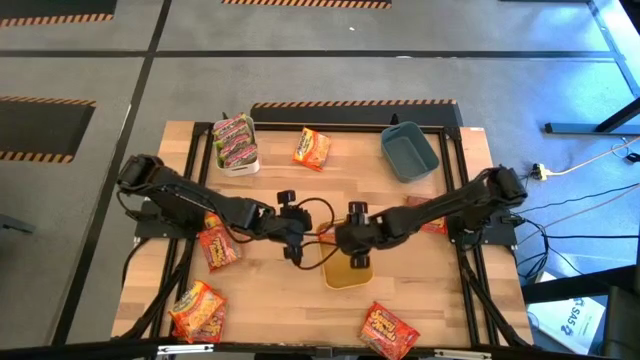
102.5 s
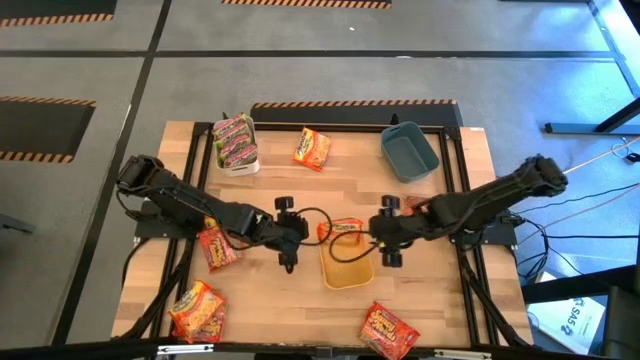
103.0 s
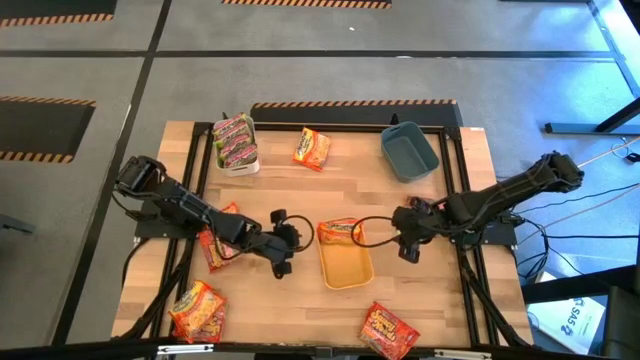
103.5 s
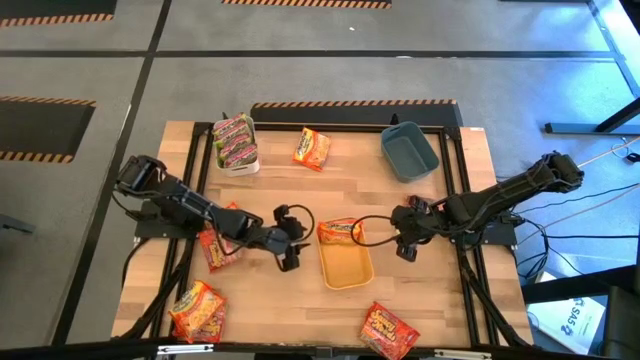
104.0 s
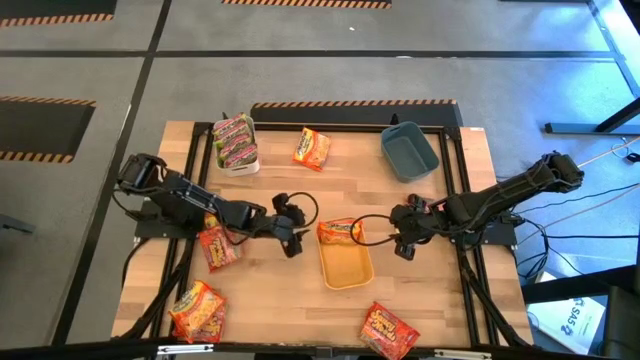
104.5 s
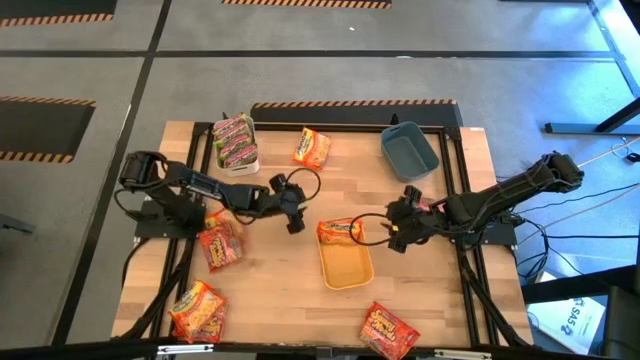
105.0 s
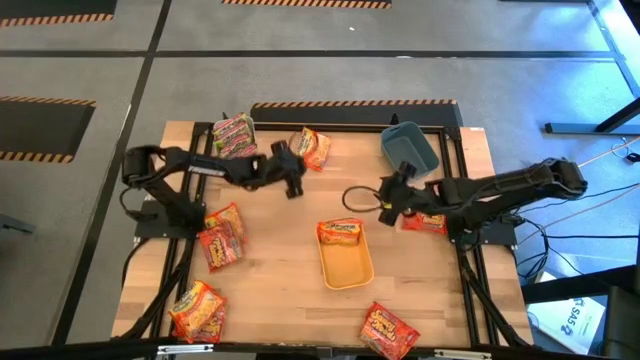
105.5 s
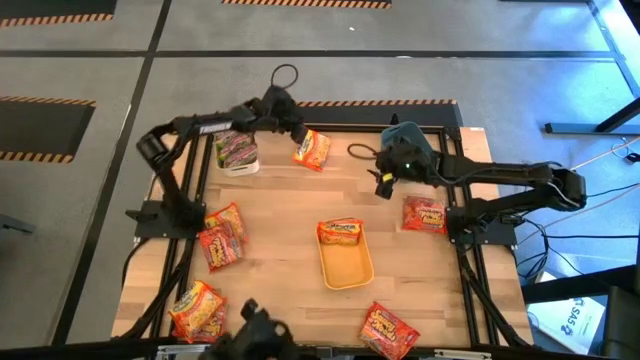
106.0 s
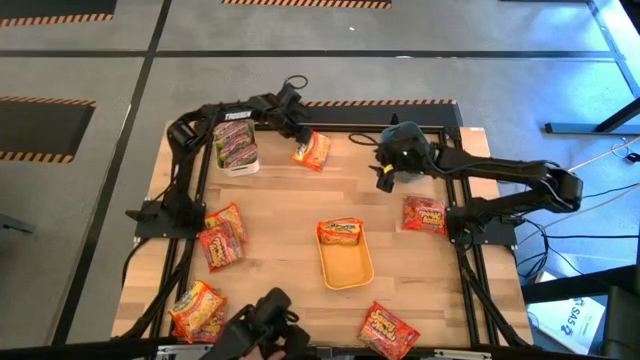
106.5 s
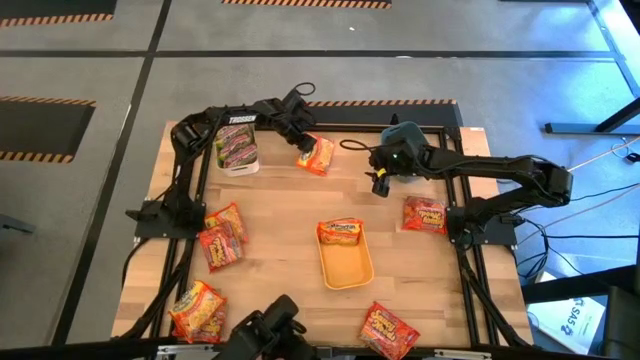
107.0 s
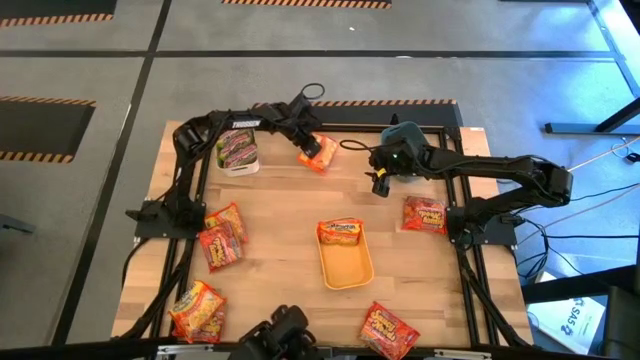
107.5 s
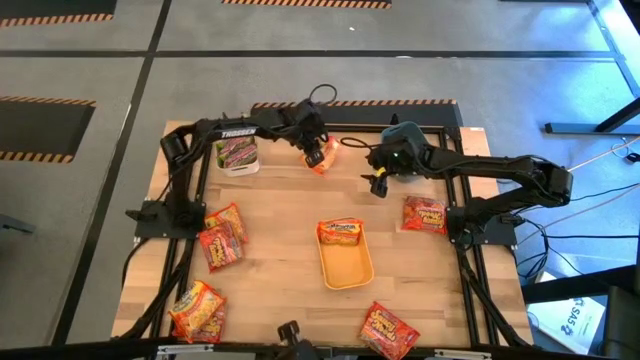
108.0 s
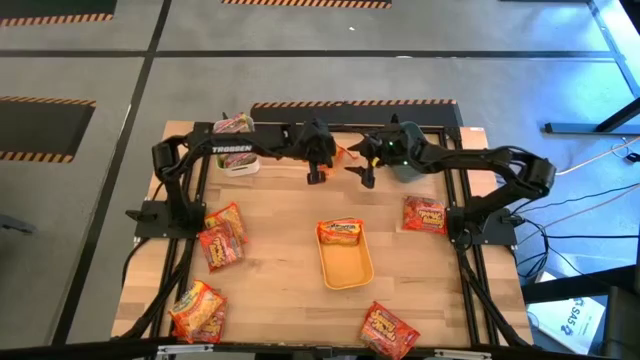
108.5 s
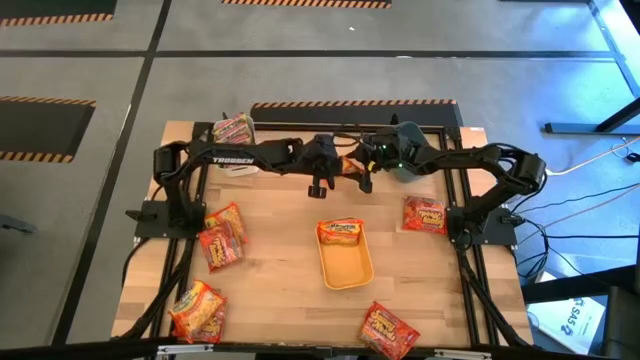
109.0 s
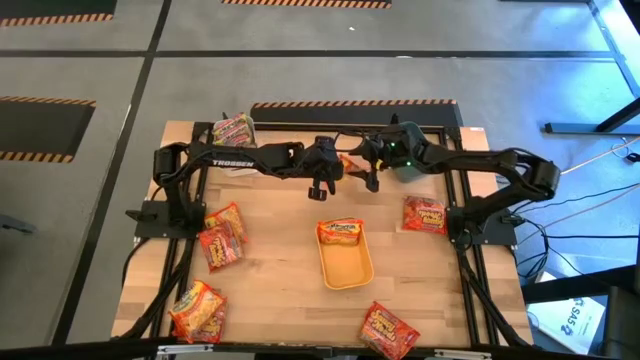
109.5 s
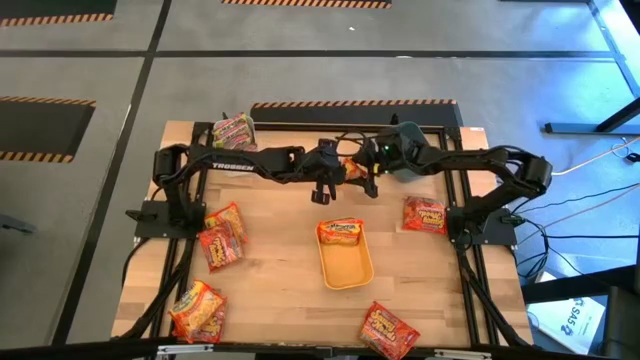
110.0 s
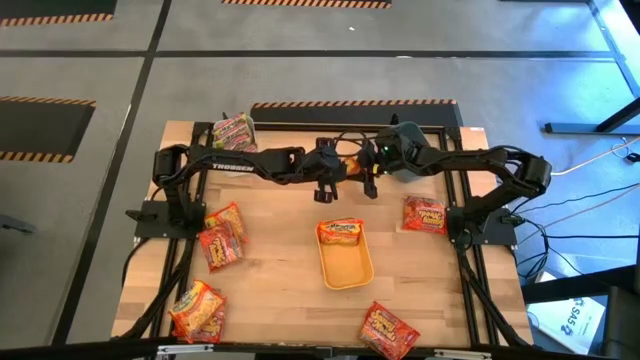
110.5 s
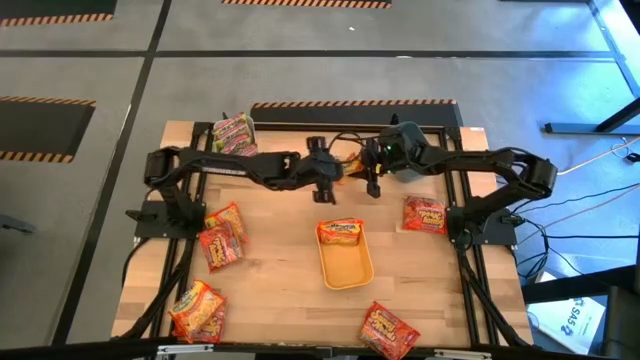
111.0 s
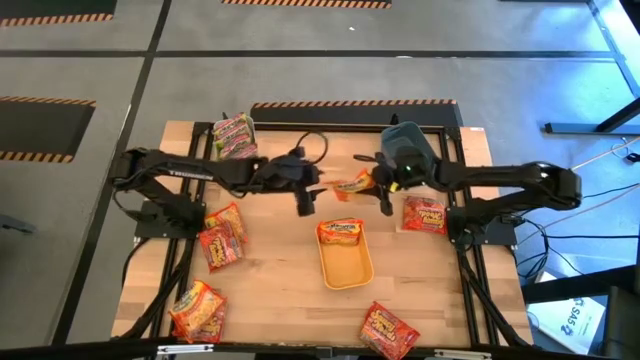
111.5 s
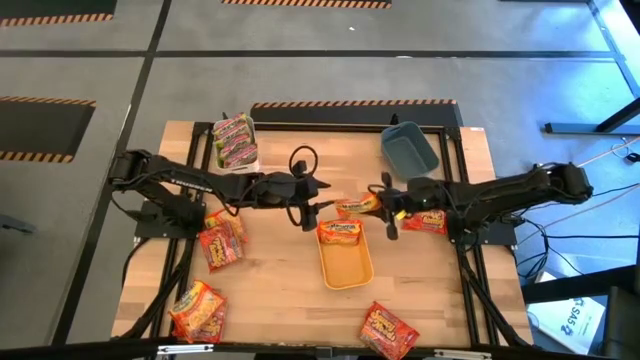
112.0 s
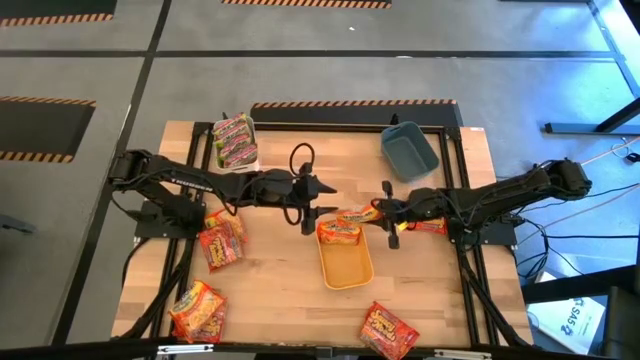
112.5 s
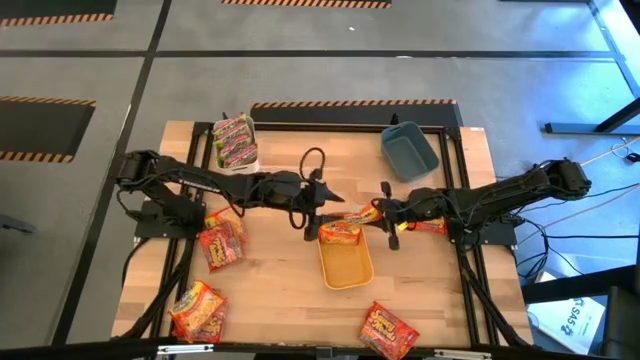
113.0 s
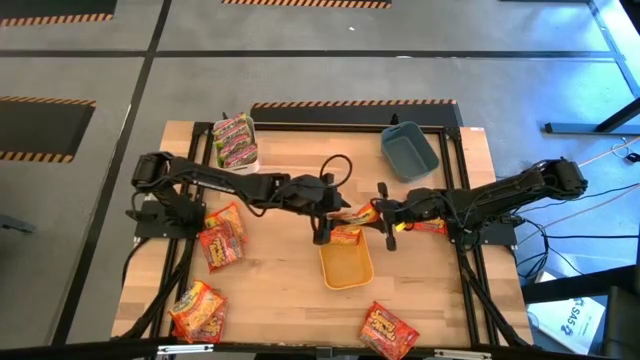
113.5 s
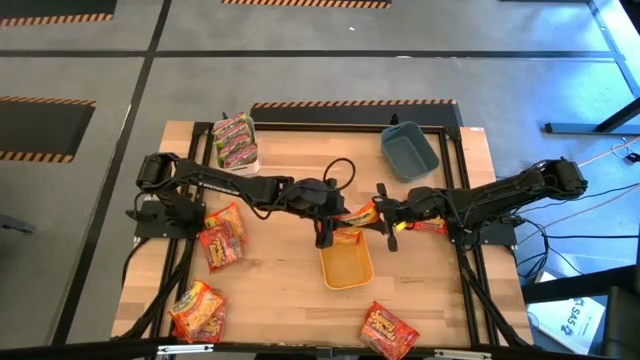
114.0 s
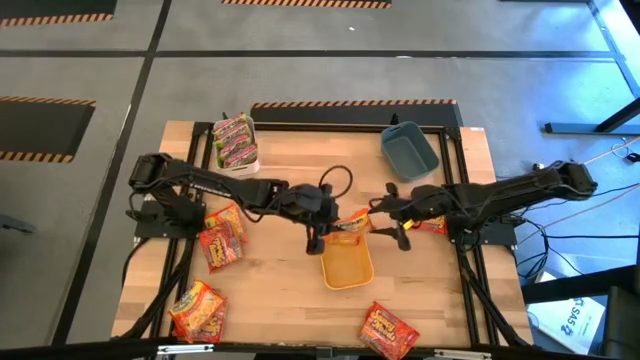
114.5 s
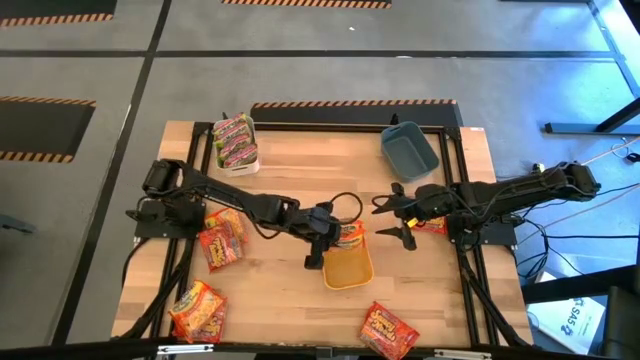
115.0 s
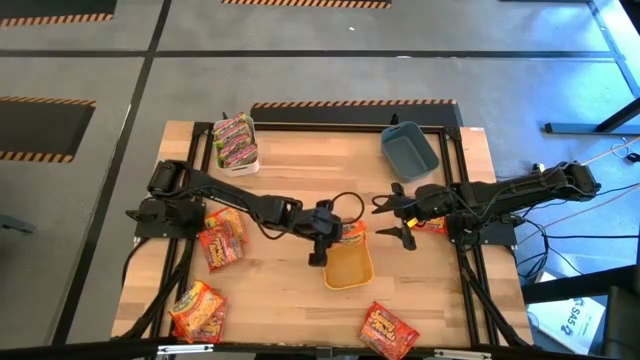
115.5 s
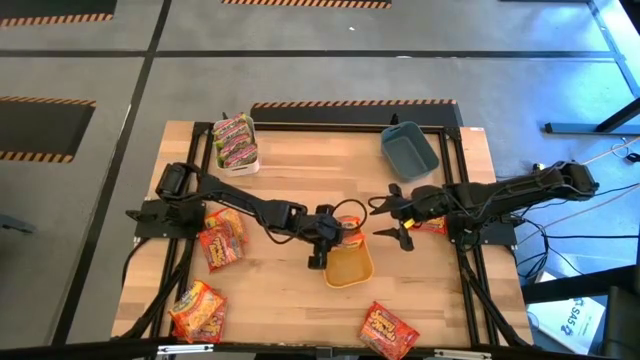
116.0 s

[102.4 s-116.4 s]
Task: Sort Maruchan noodles
Put the top right orange noodle pack into the yellow bin

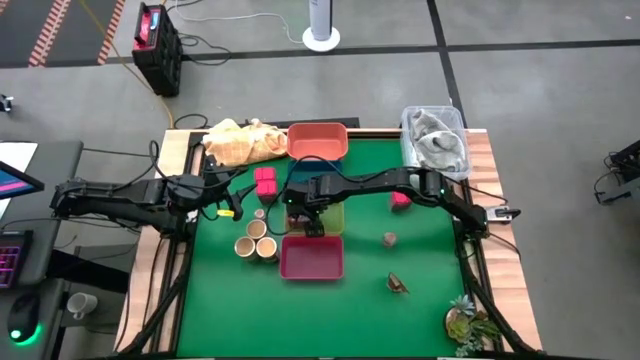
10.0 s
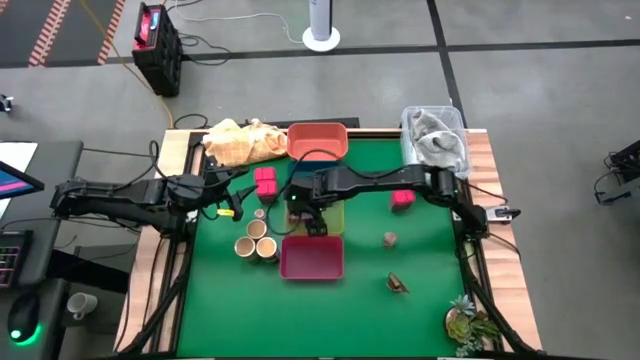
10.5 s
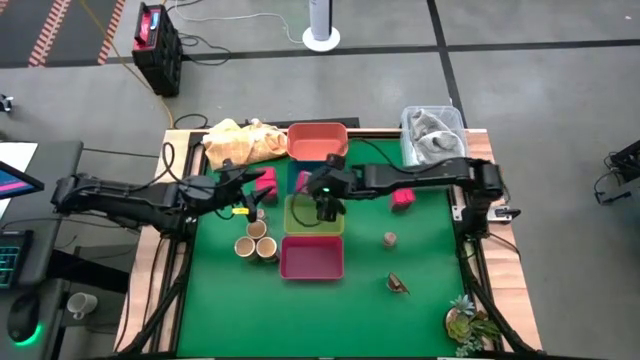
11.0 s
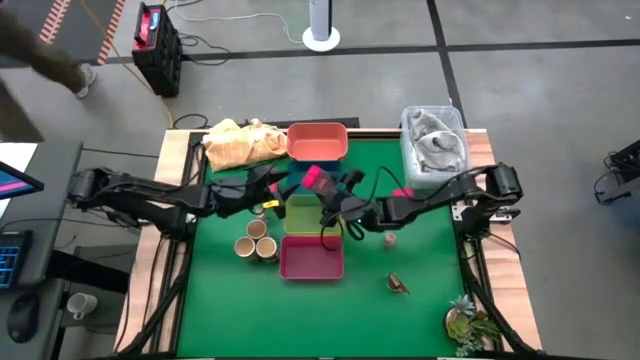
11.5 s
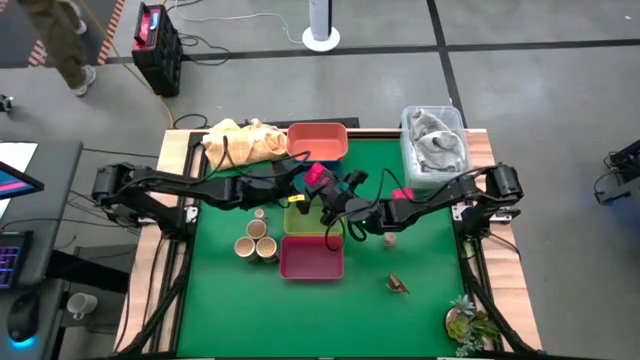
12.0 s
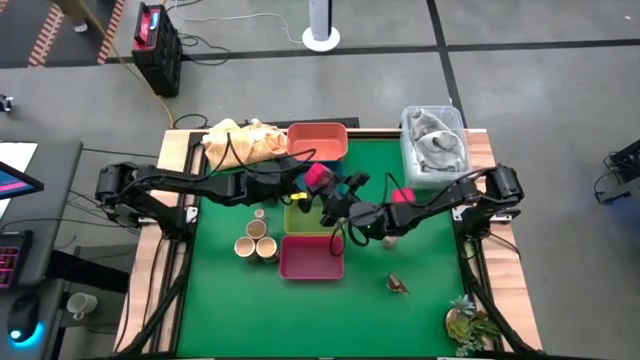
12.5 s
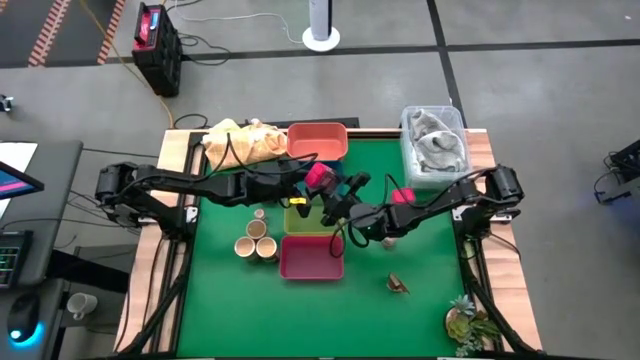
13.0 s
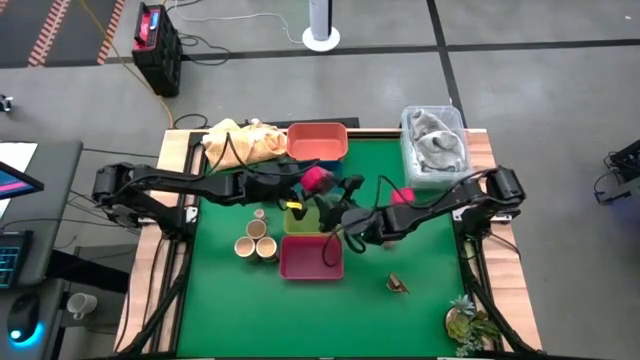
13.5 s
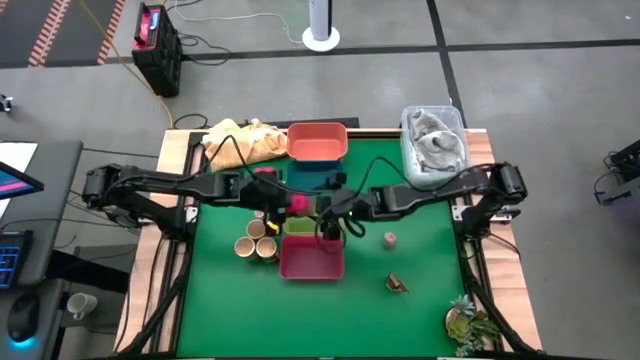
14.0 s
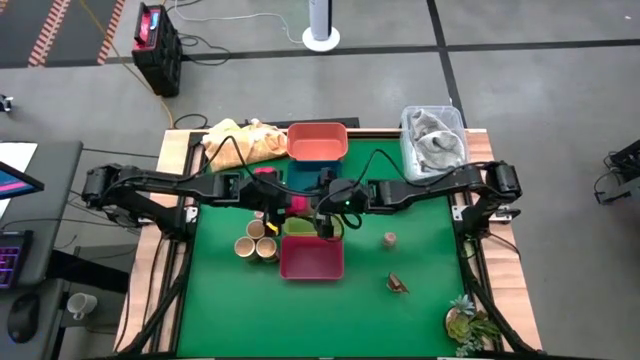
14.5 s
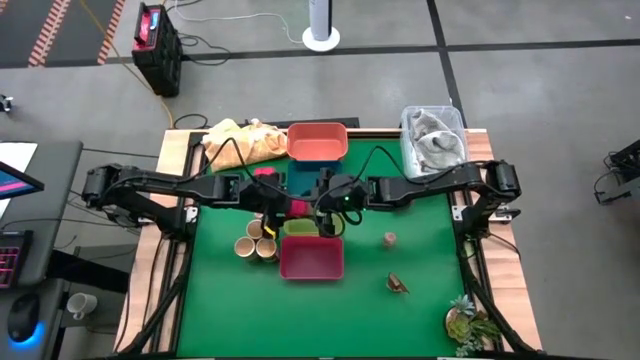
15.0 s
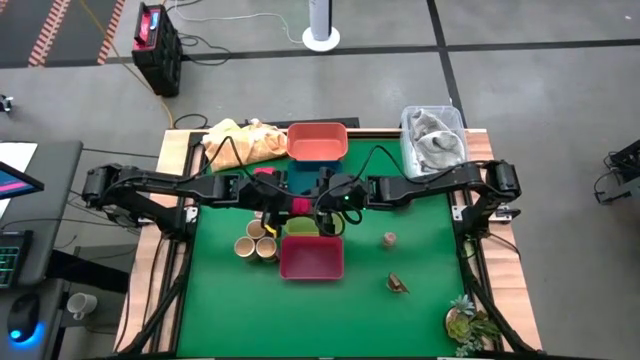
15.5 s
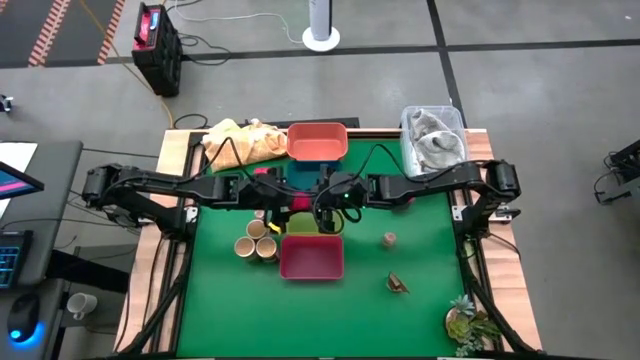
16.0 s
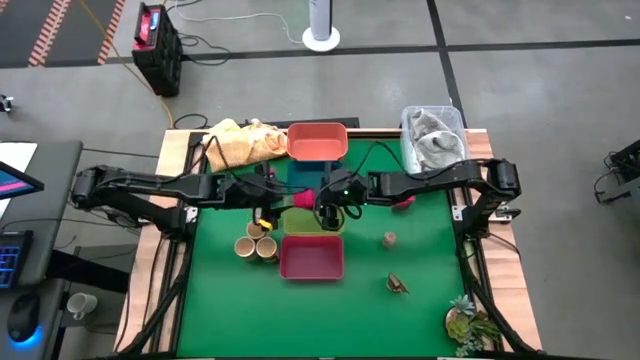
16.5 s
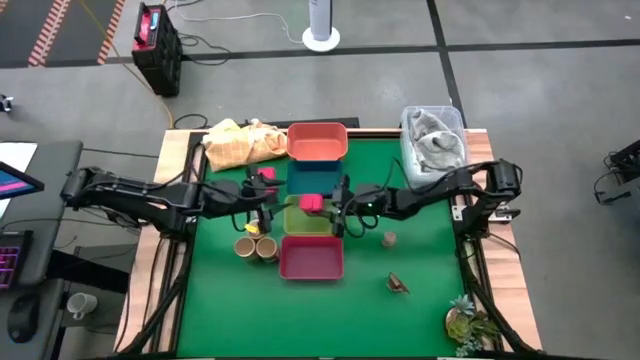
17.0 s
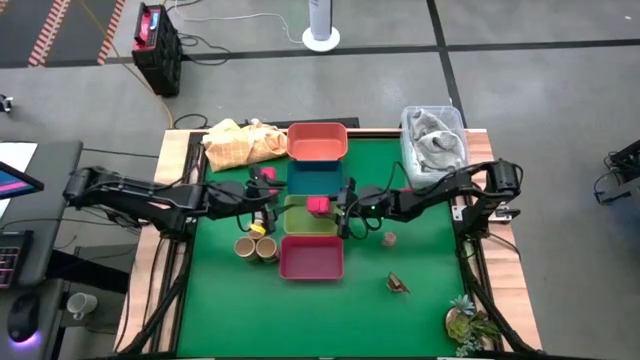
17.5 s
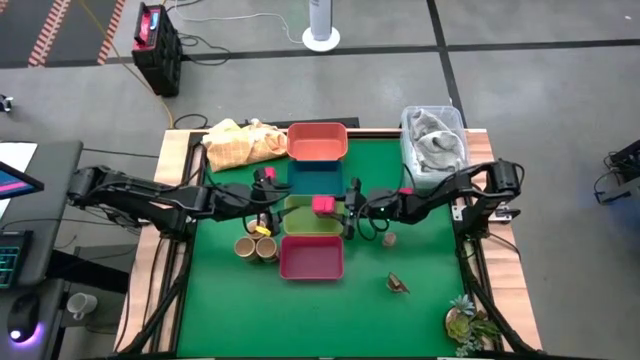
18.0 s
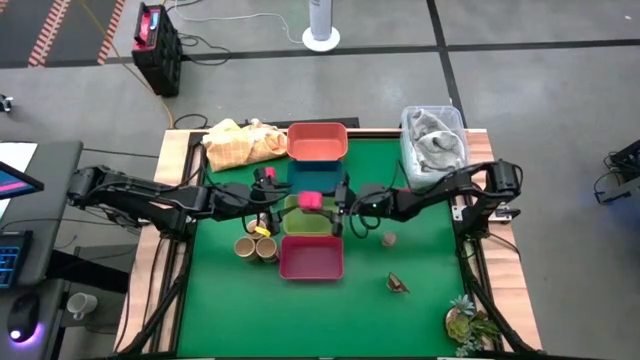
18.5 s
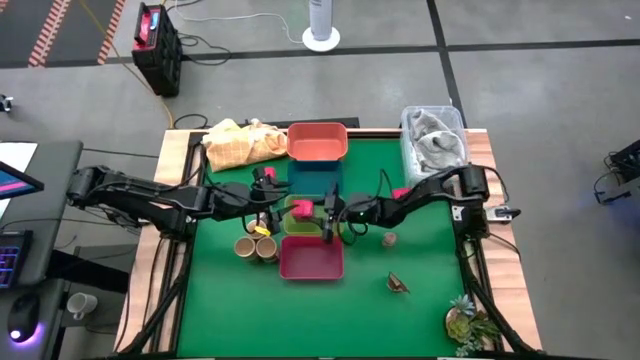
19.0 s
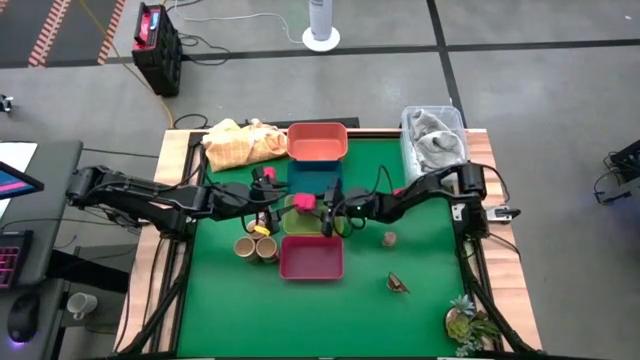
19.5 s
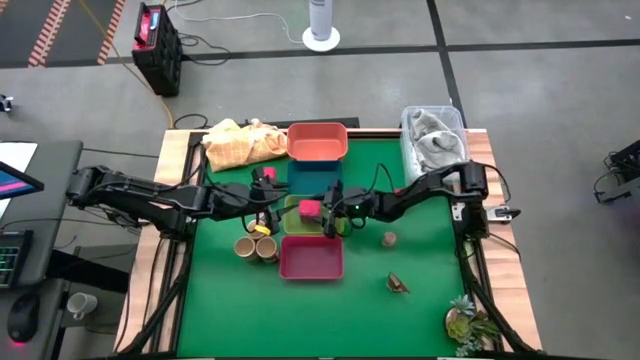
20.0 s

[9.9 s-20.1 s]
Task: Sort spices by type
Put the bottom right red seasoning bottle into the green bin
